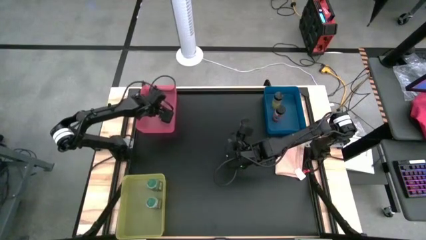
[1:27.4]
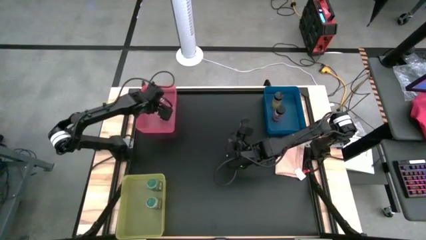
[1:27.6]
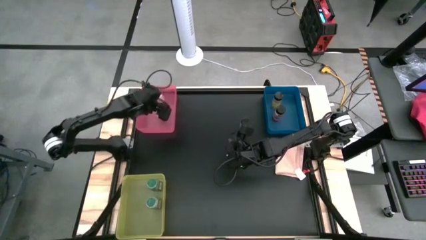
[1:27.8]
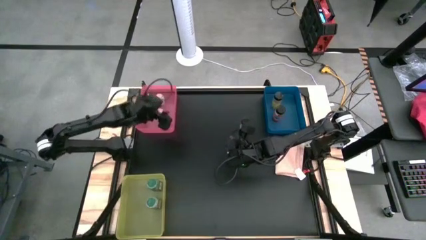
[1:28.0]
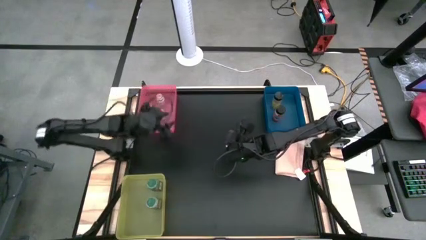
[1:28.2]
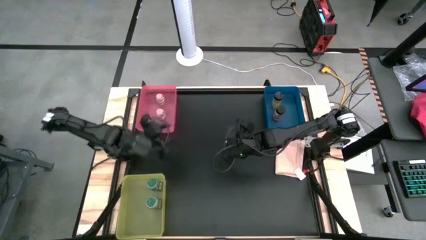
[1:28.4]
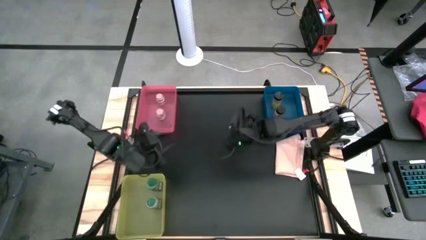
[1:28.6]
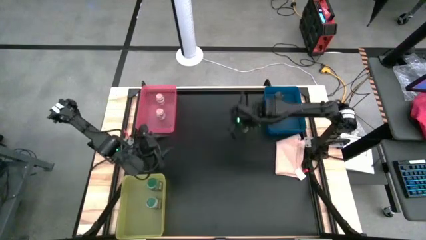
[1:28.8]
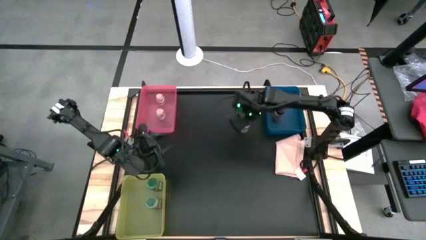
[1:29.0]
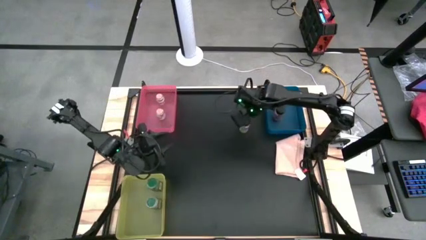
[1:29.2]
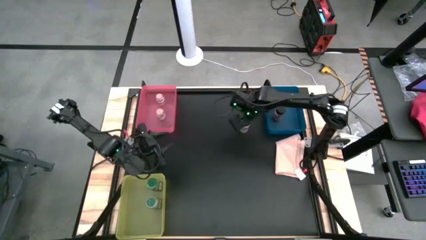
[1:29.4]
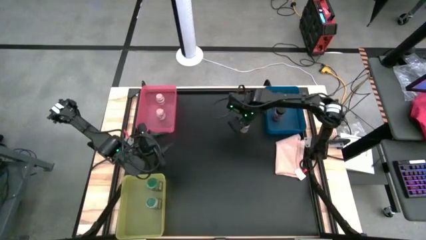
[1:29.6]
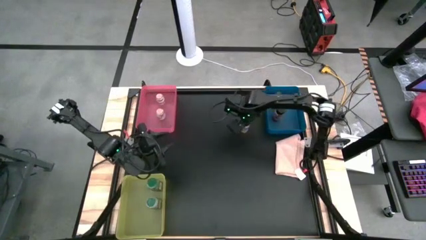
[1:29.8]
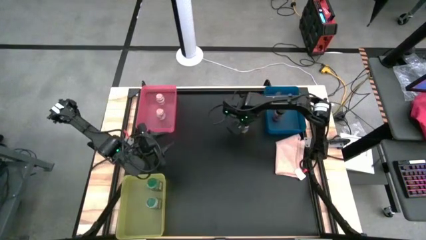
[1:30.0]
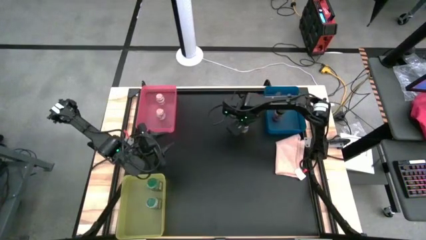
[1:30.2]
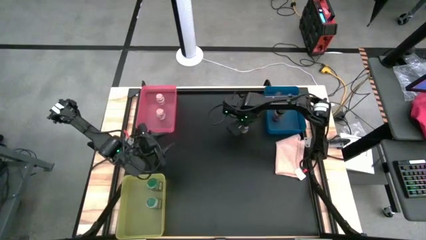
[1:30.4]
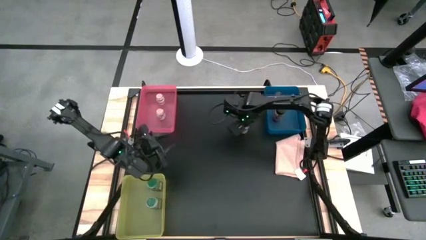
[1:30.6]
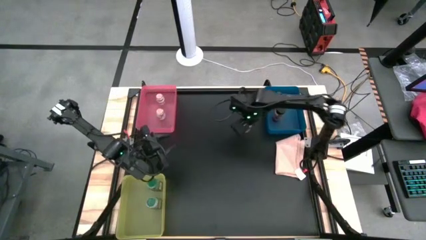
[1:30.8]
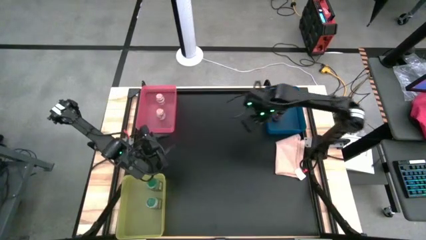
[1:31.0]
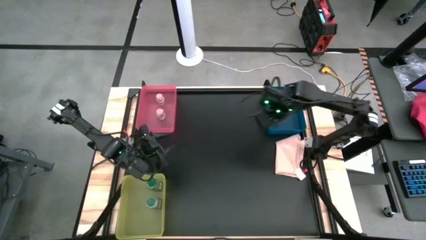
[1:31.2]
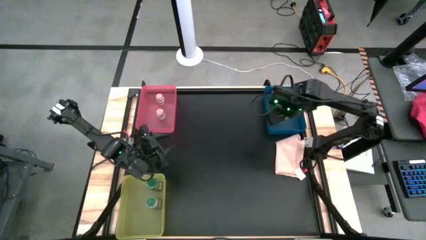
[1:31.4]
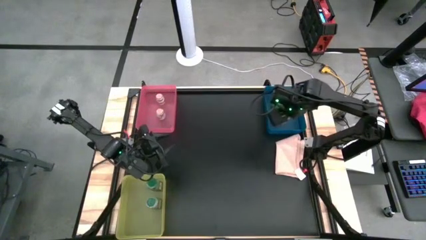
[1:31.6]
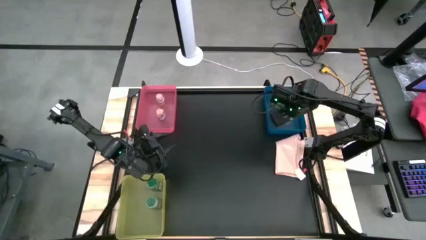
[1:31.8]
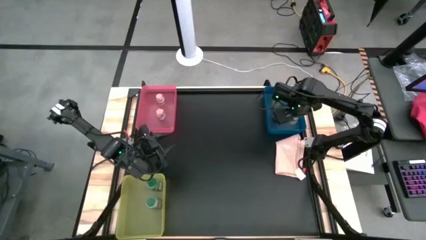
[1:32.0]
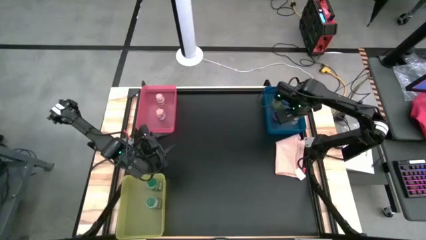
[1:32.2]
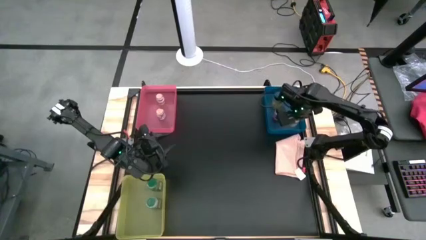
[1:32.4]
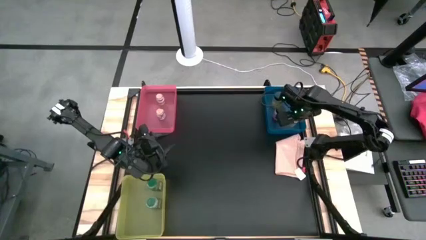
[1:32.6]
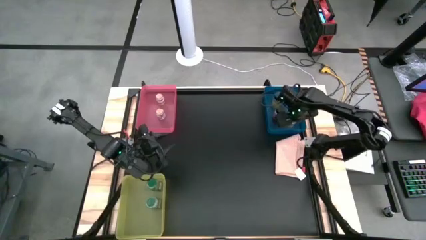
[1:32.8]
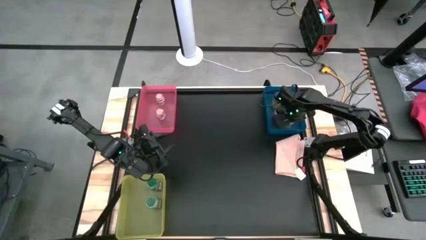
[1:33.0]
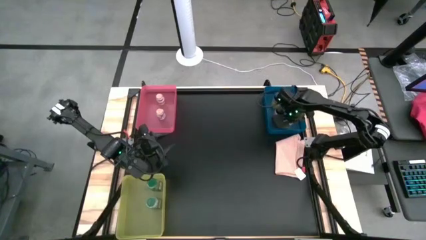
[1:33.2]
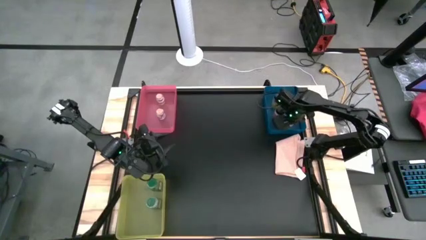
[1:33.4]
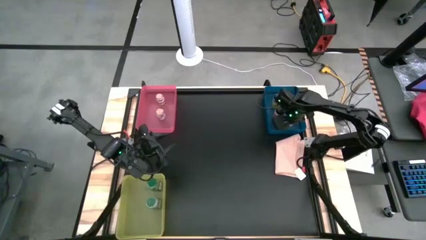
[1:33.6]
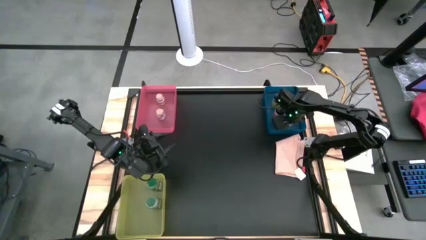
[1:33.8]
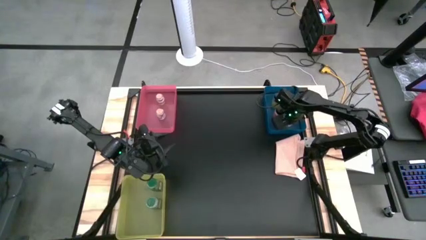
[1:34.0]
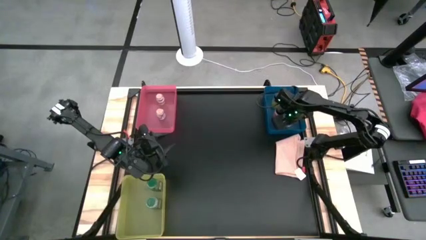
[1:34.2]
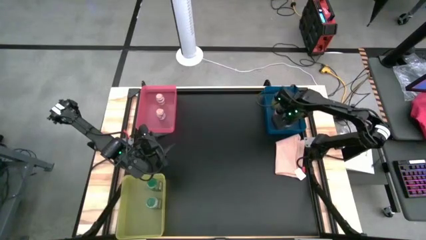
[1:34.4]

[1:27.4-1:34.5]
Task: Sort spices by type
Put the black seasoning into the blue bin

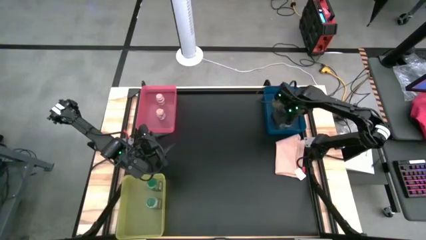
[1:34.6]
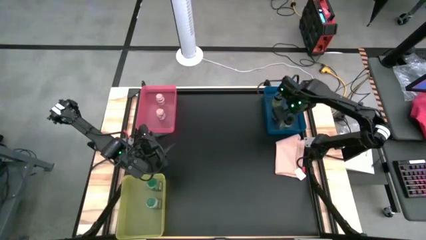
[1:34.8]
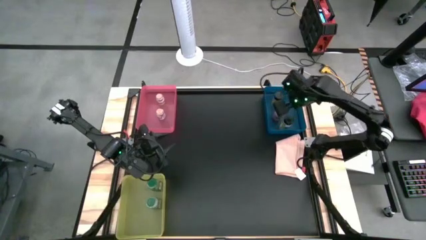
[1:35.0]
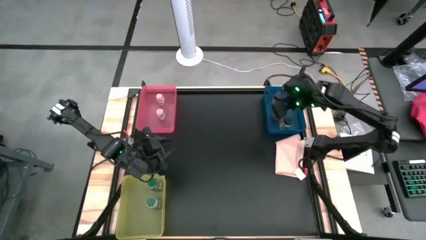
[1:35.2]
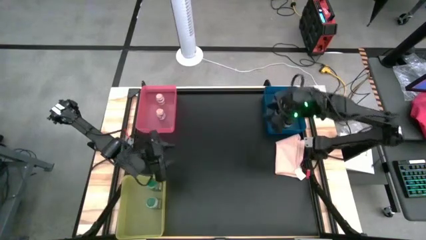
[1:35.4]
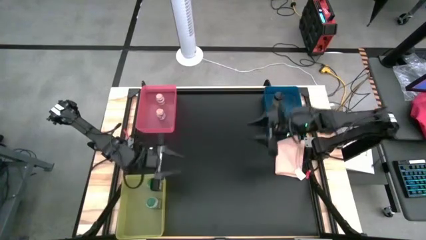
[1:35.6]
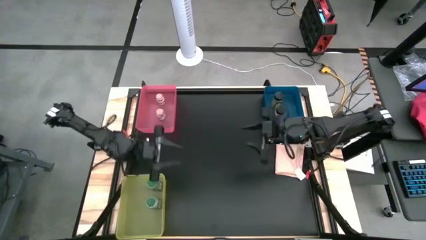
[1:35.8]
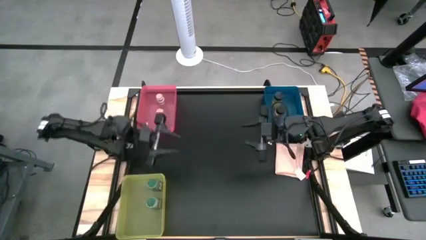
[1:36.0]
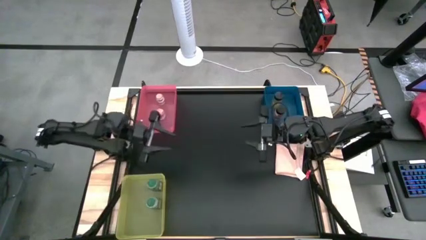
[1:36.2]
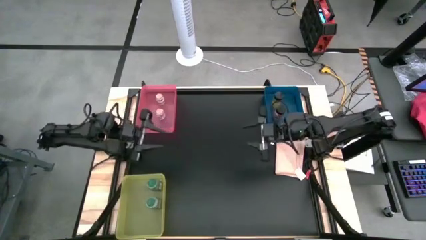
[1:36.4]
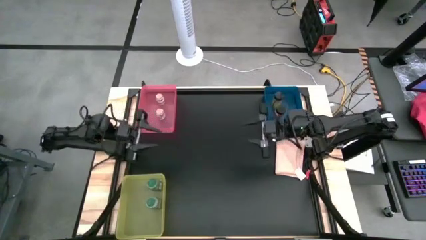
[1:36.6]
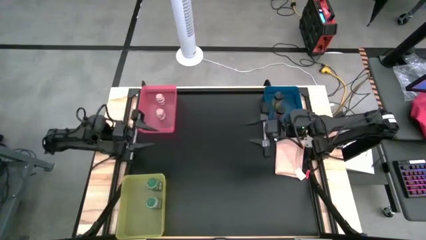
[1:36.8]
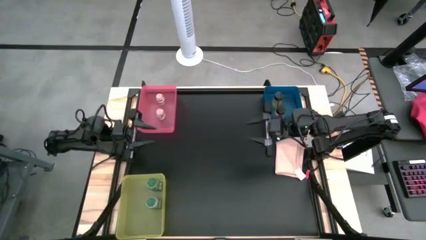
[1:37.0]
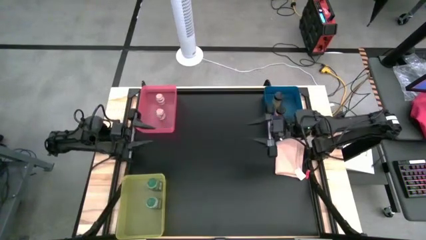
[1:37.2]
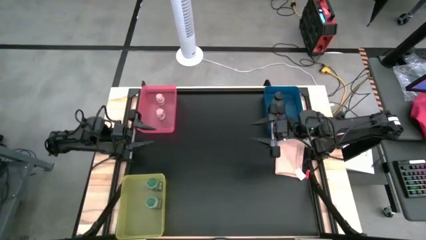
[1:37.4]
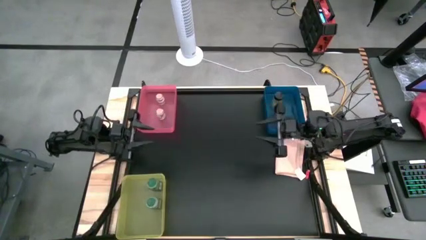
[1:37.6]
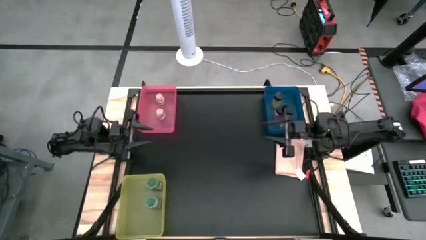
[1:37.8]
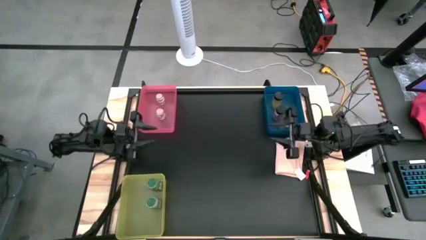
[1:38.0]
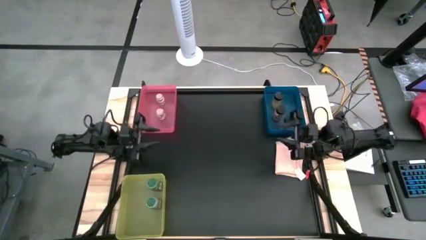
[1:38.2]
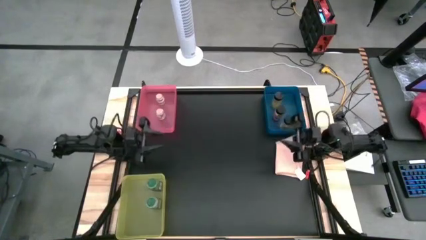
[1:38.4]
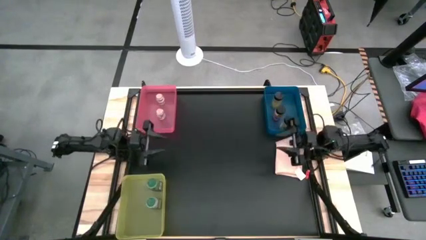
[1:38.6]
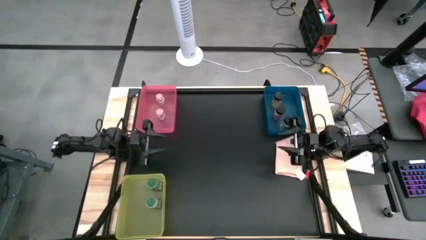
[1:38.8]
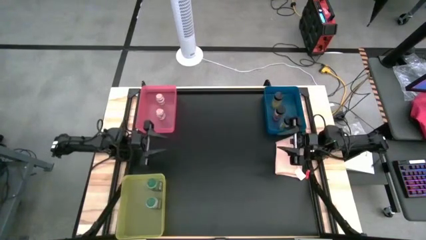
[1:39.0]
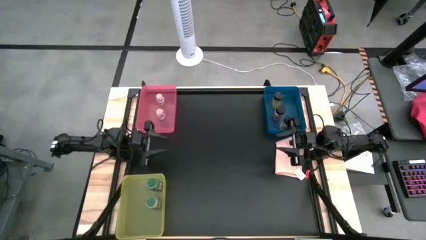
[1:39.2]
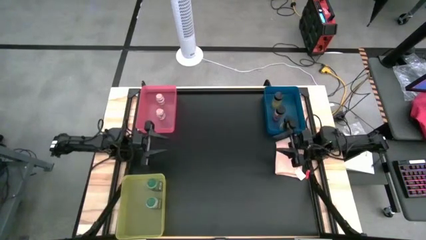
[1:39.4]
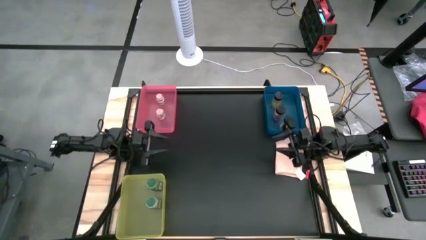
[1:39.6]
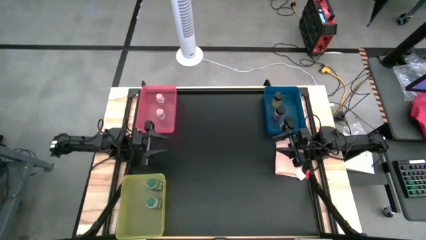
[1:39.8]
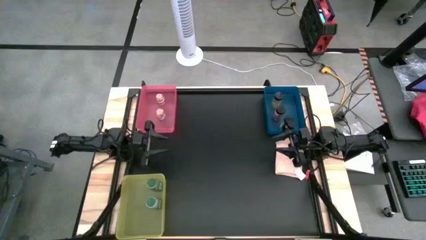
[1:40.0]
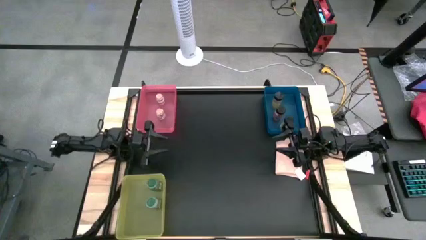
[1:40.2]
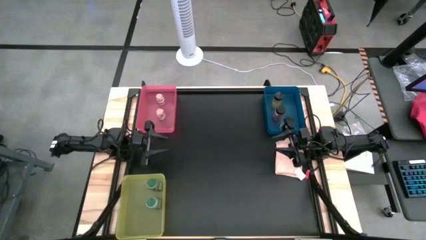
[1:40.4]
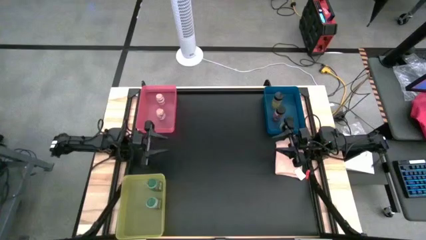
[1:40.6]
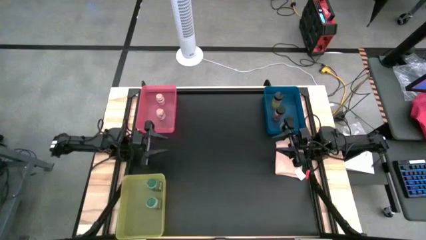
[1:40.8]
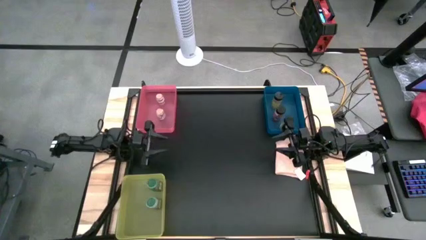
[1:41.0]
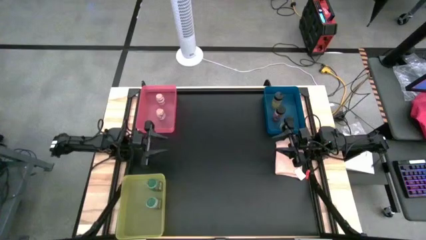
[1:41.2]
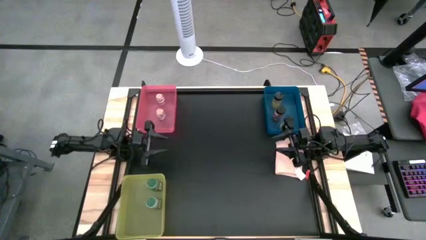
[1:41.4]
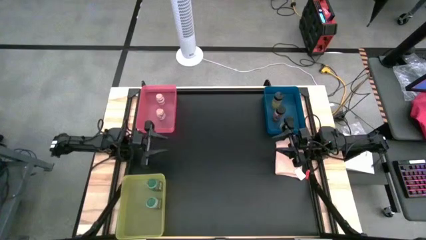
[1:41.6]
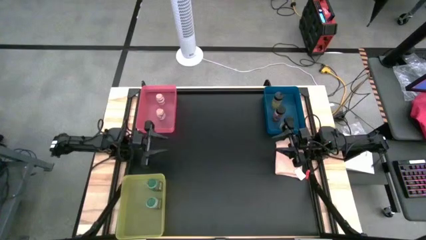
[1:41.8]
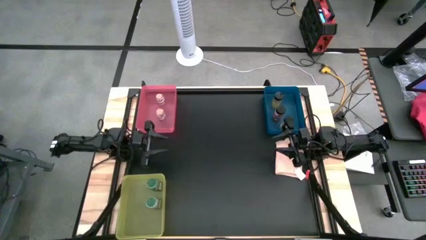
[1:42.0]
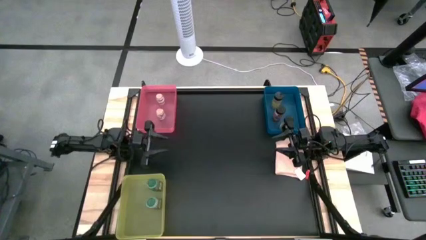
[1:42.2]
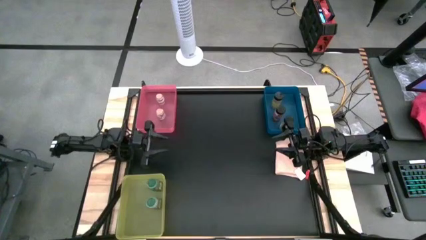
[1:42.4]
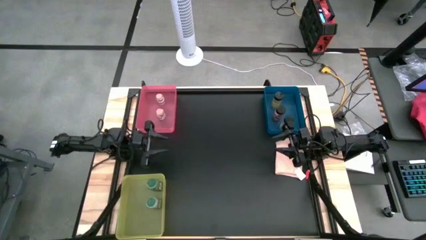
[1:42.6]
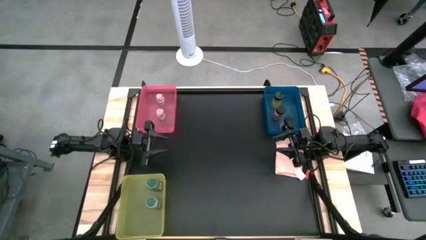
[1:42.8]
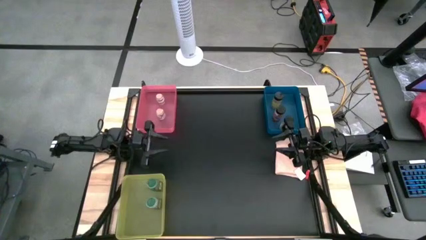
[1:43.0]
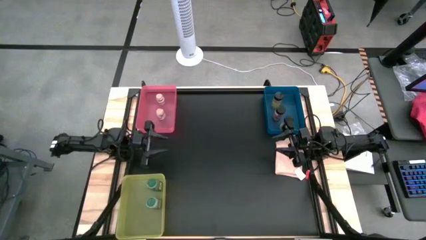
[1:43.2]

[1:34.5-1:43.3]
Return to Home Position

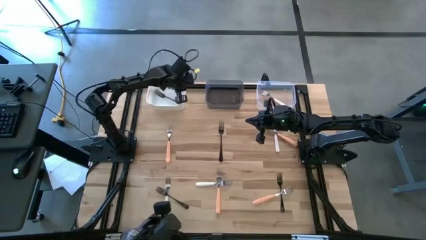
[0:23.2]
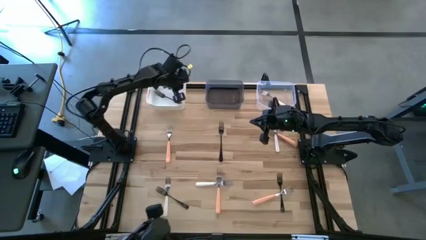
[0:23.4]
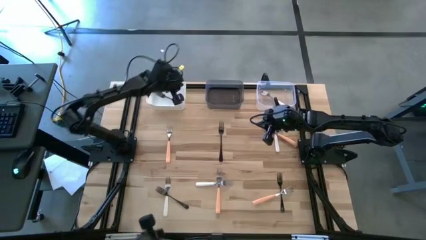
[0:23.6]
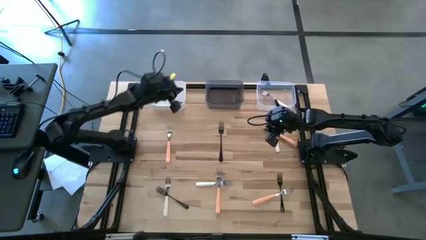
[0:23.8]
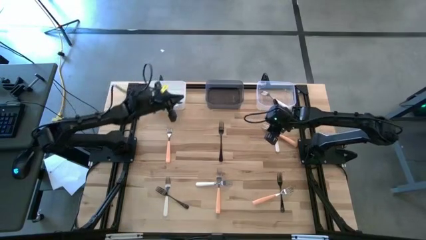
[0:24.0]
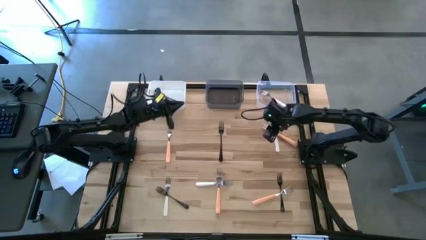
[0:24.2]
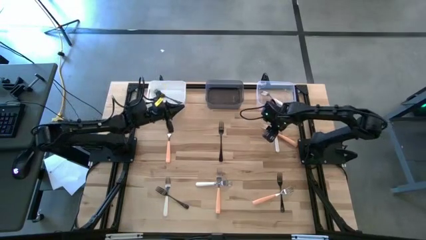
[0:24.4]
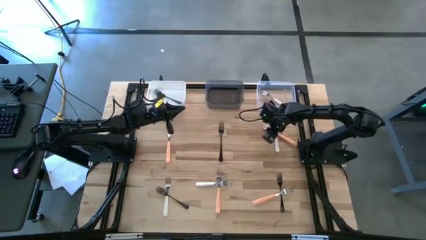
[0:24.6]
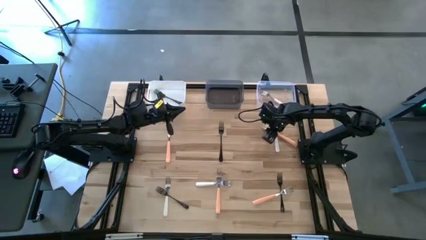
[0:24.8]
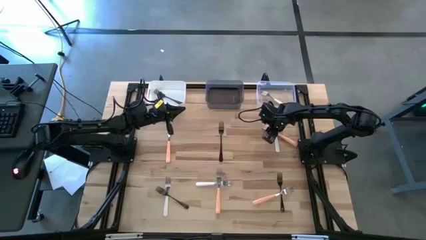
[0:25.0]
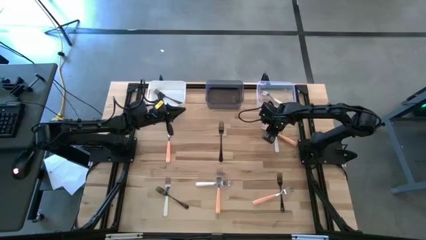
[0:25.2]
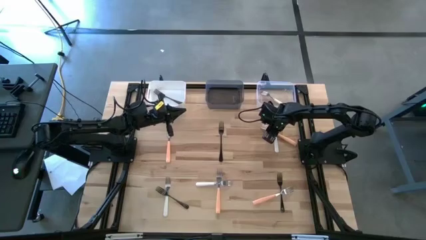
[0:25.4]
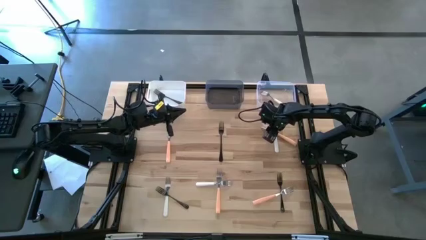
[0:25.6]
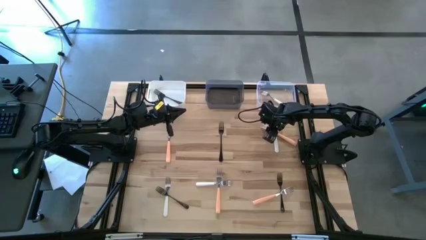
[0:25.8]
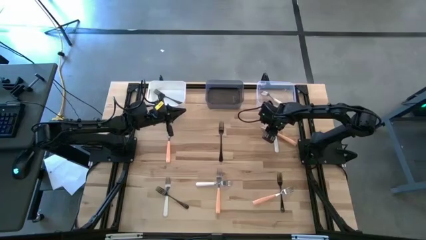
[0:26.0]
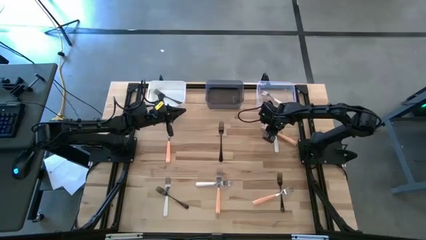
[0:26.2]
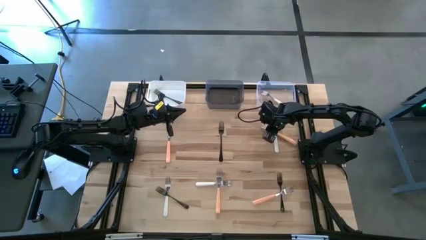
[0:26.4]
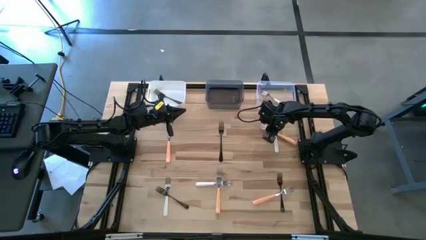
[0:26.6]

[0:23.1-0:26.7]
Task: Sort silverware by color (type)
Put the top right orange fork into the black bin
